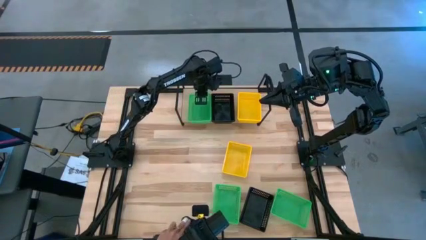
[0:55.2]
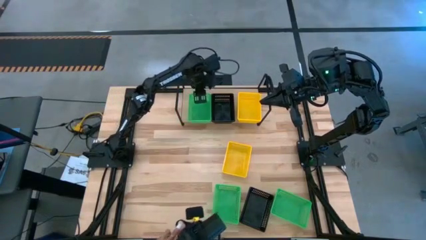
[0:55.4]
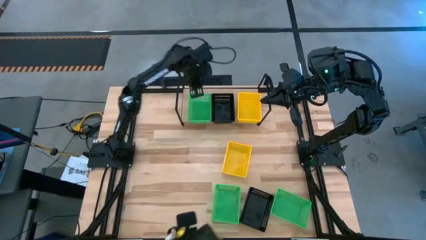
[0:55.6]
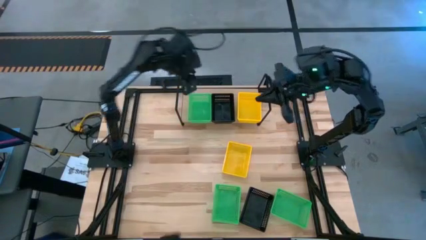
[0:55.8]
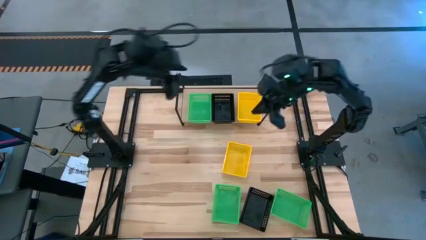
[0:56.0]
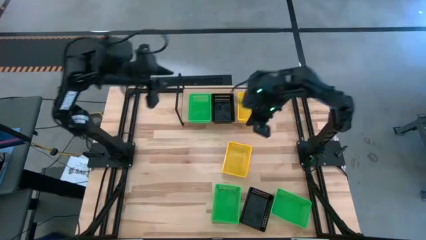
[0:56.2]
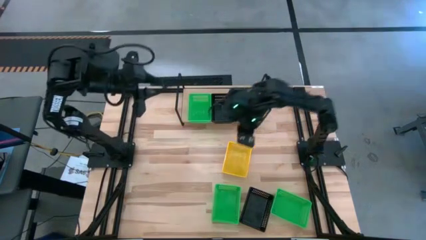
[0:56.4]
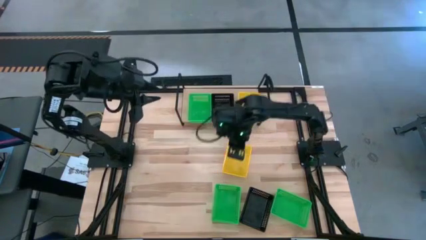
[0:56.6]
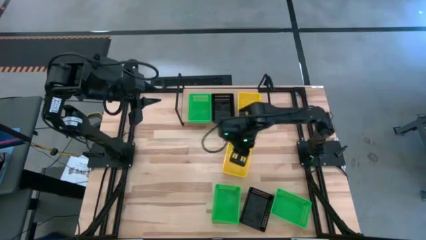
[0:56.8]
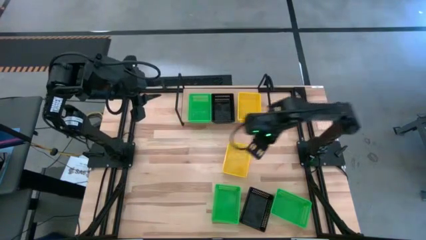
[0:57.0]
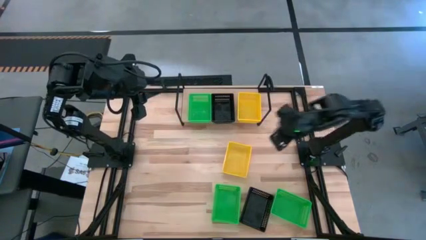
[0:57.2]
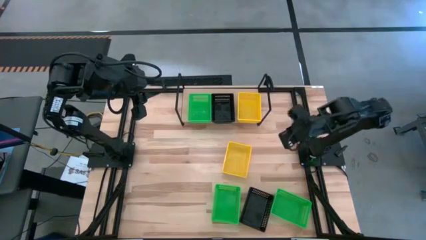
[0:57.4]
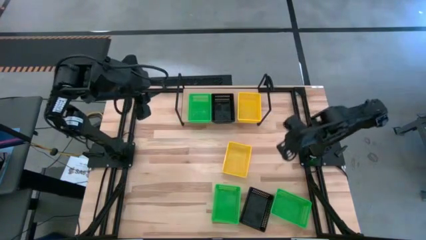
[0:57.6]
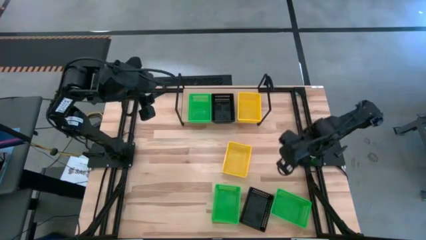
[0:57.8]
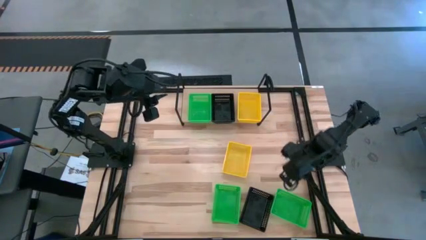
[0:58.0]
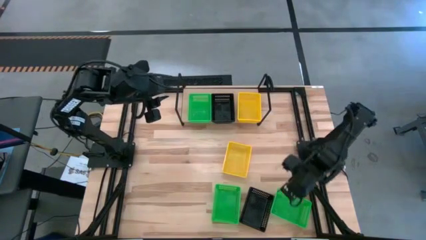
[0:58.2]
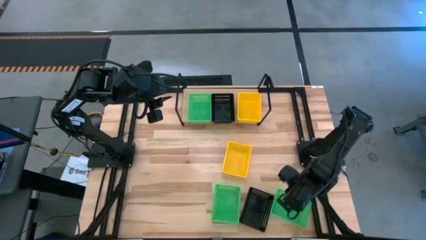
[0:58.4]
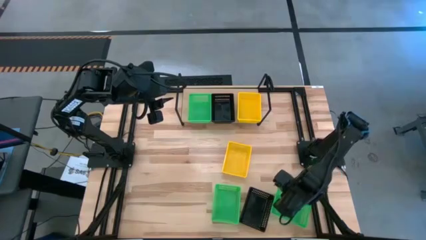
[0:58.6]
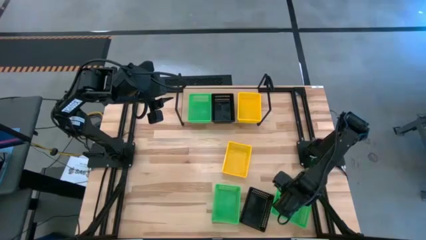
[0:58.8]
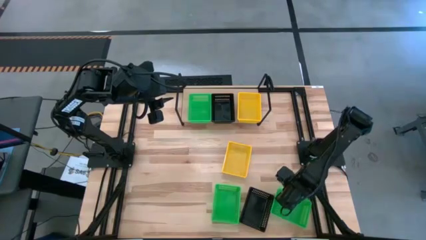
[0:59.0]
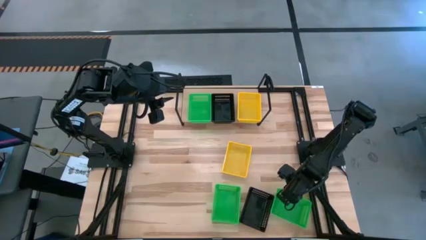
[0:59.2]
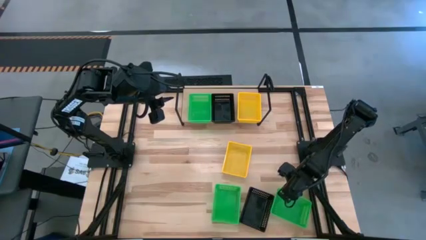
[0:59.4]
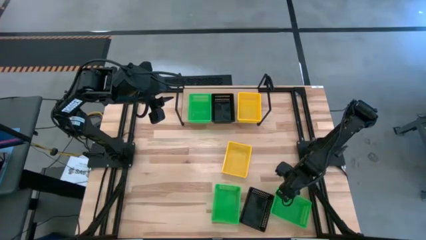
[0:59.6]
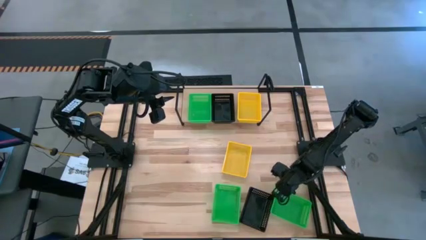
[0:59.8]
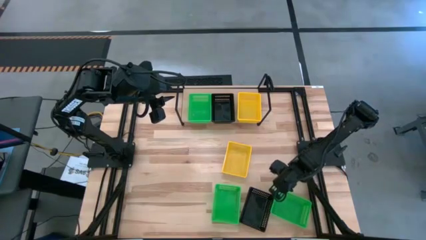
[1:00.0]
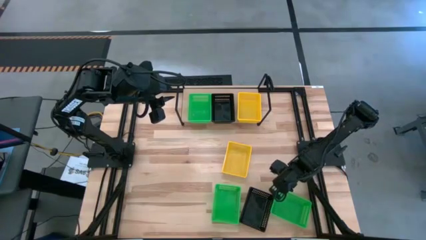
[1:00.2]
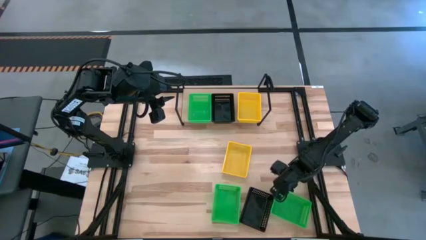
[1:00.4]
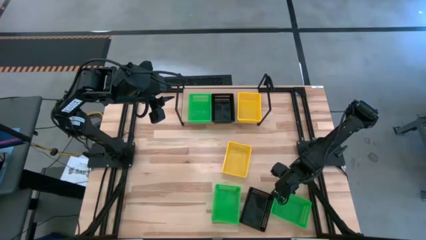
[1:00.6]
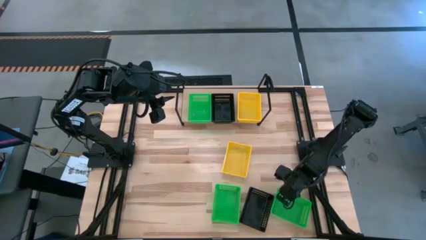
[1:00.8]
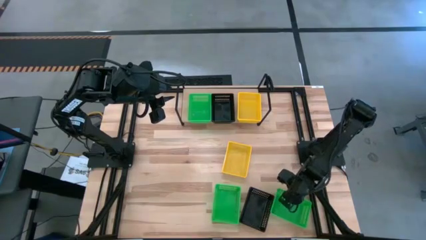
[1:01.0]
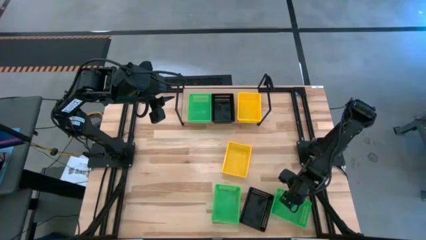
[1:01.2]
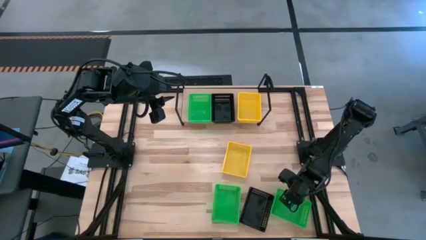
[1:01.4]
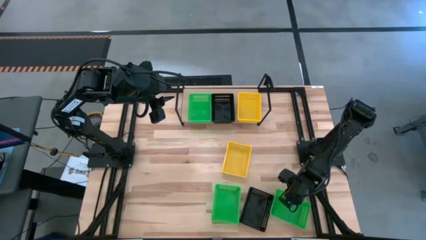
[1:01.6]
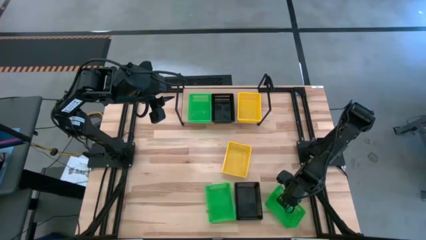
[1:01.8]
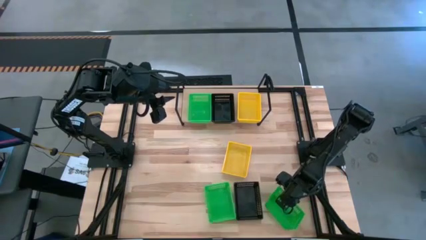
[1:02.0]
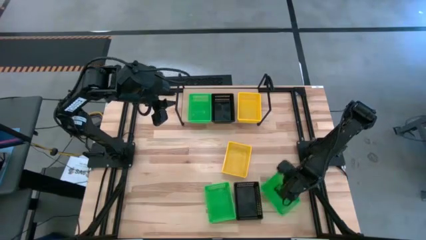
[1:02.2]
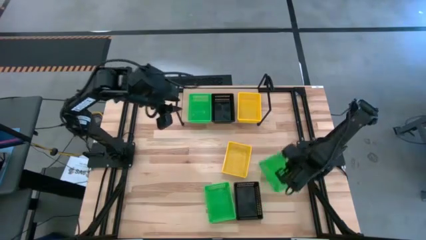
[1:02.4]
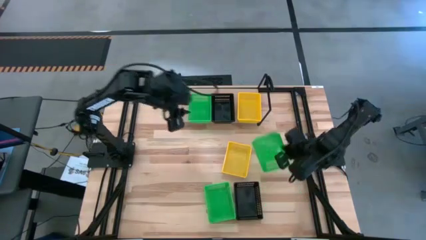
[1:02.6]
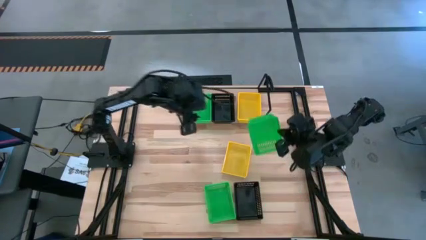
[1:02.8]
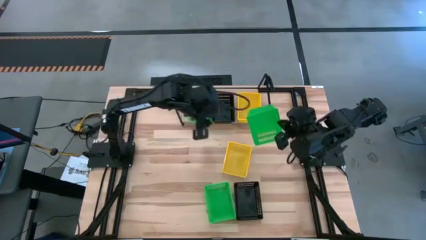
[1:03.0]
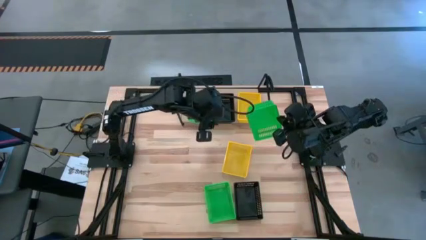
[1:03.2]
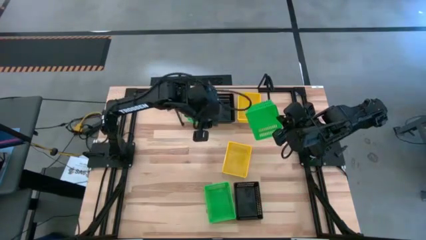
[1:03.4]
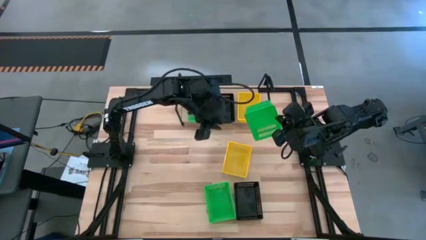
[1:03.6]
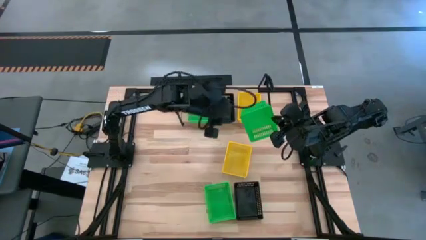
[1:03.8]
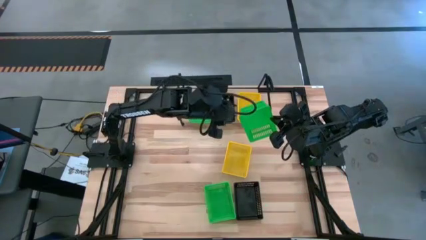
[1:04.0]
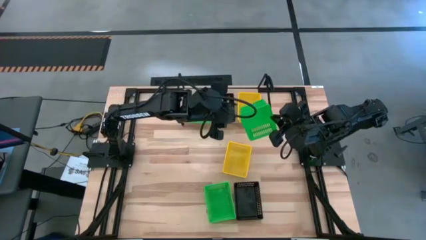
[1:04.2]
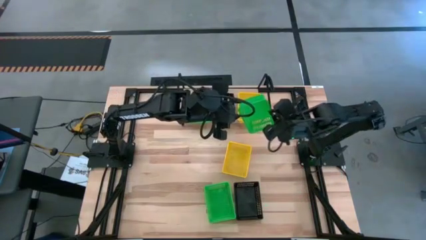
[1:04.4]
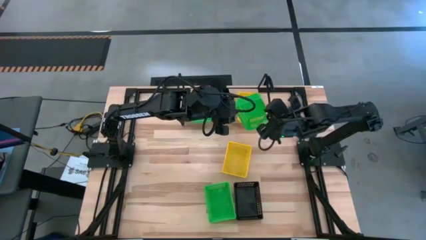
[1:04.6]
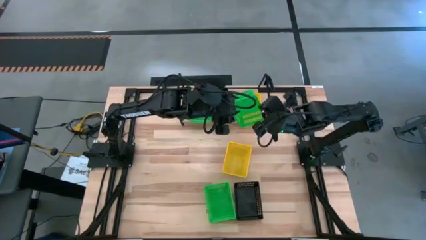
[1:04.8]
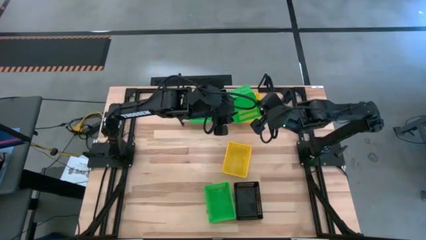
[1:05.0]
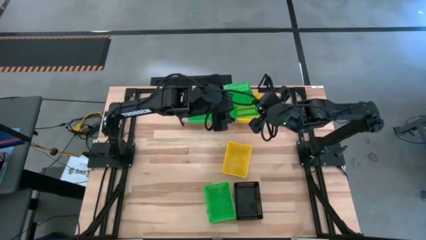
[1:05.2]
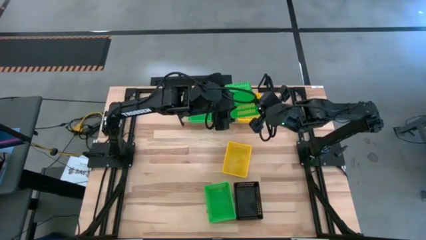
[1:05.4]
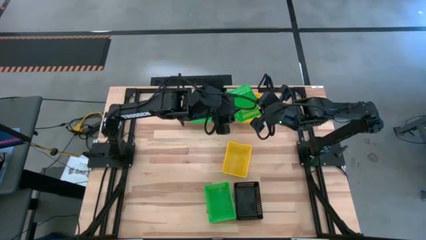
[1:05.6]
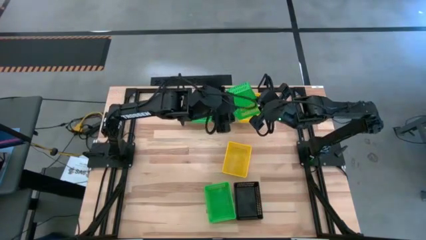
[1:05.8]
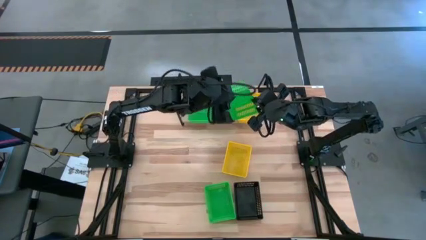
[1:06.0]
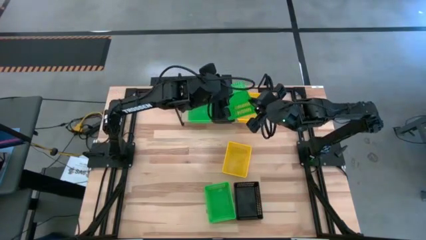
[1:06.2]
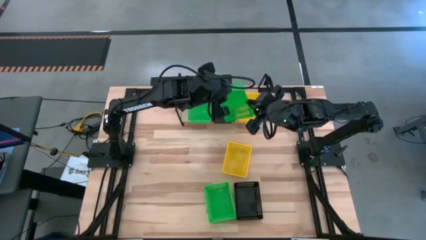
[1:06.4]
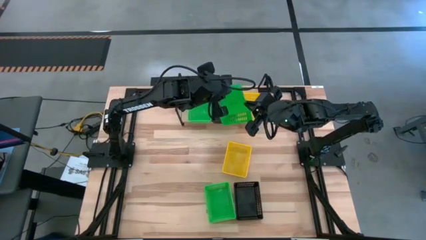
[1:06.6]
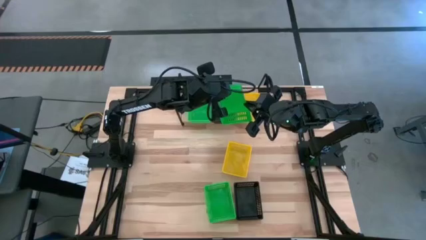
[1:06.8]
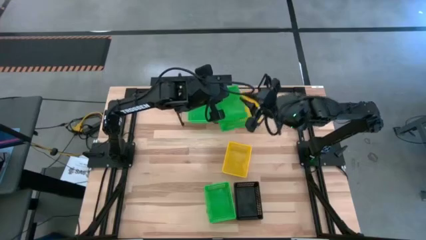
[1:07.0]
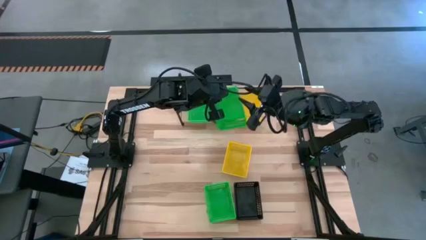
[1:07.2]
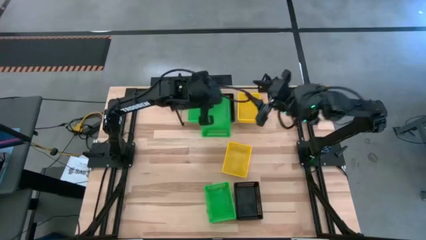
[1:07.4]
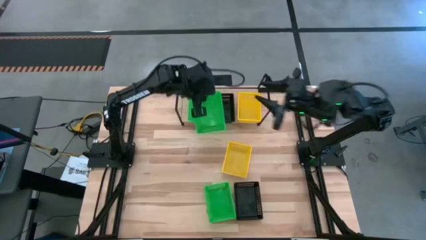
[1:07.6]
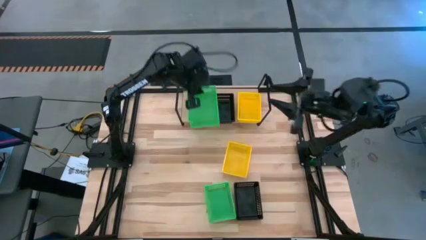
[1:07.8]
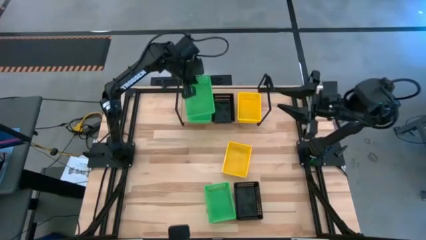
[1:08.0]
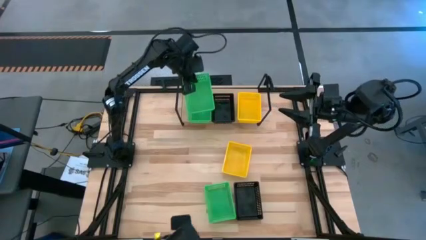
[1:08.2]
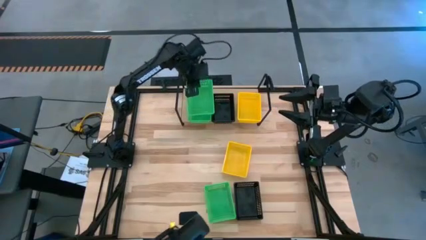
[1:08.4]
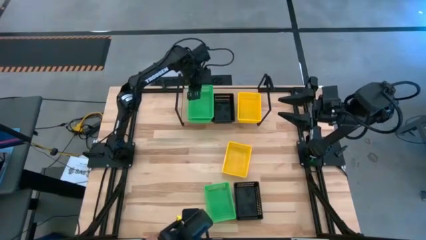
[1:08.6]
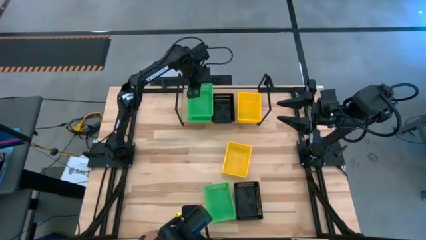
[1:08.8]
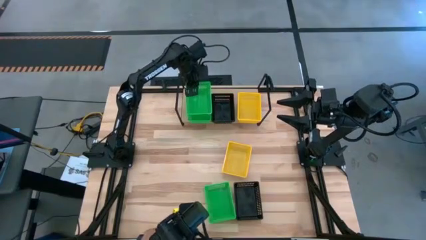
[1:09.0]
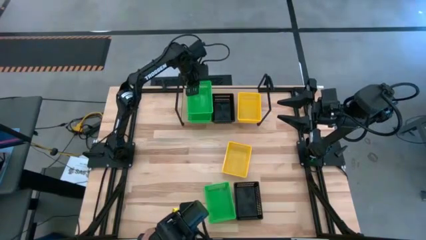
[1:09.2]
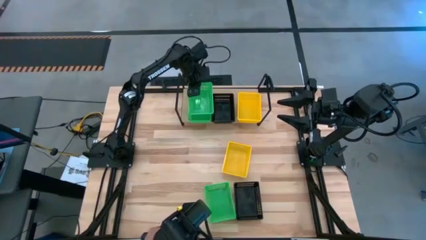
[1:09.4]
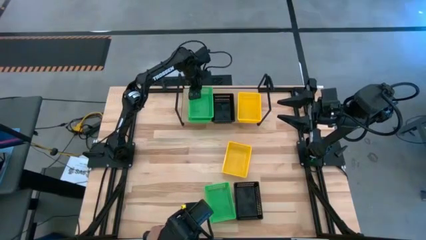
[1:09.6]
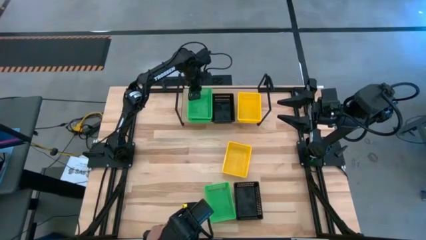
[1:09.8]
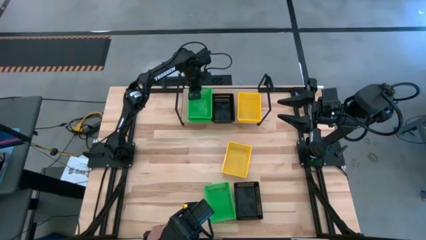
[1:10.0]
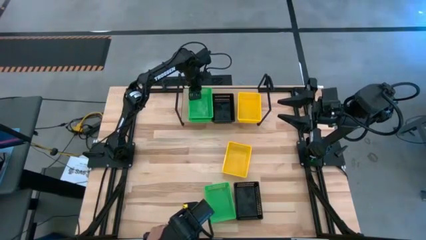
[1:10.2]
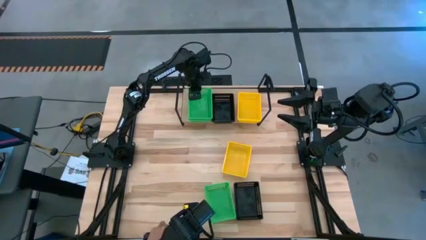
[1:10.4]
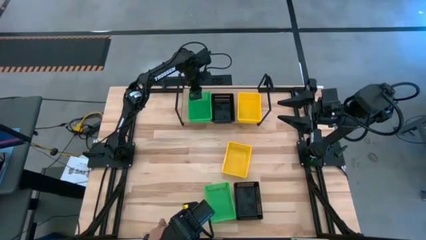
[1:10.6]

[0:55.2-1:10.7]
Task: Stack baskets on shelf by color
Stack the right green bin on top of the green bin
